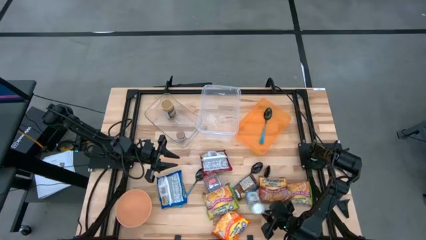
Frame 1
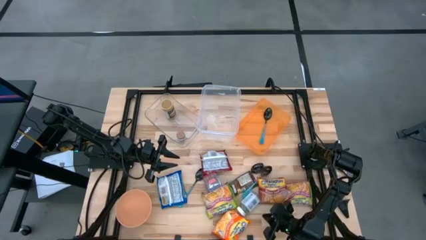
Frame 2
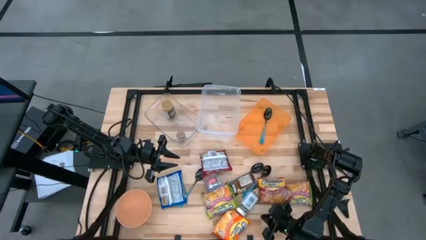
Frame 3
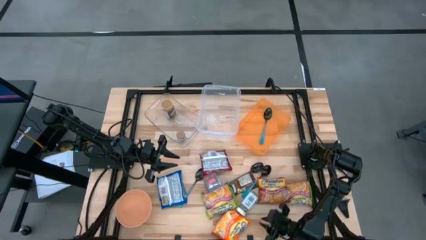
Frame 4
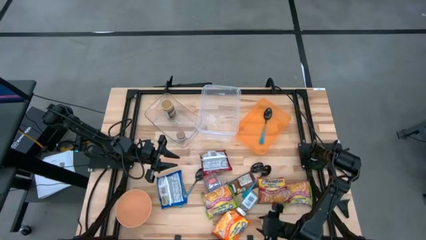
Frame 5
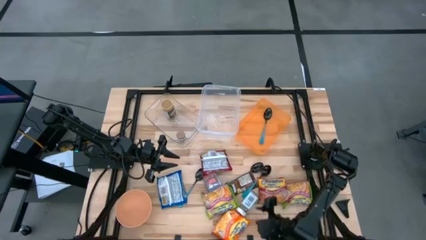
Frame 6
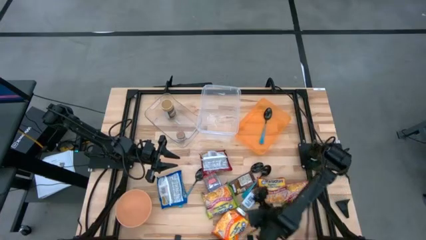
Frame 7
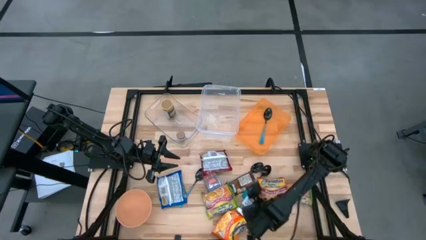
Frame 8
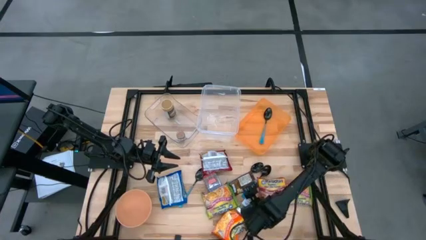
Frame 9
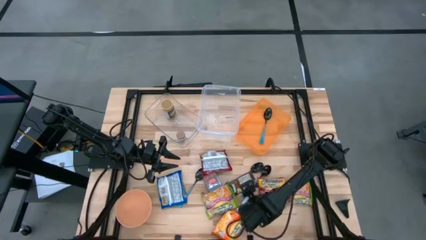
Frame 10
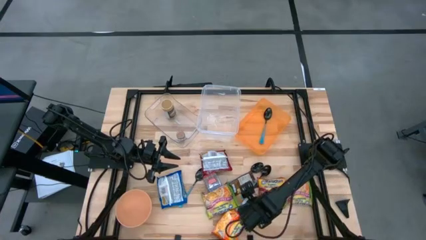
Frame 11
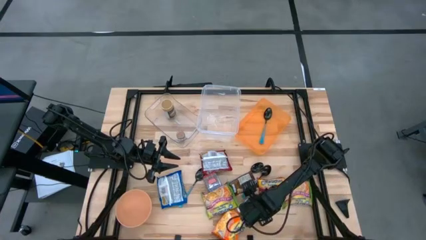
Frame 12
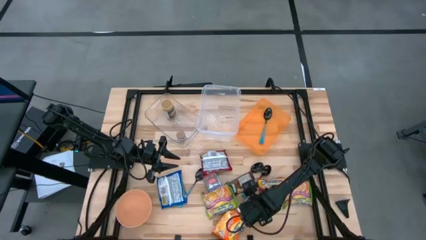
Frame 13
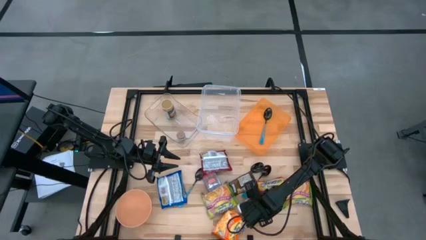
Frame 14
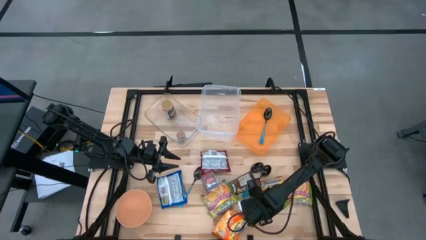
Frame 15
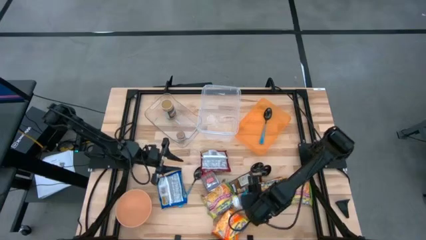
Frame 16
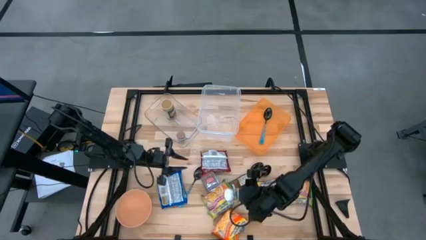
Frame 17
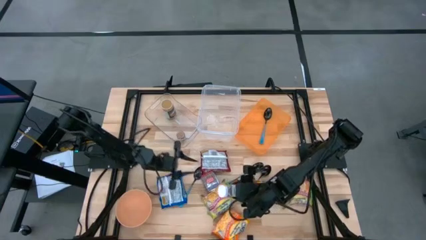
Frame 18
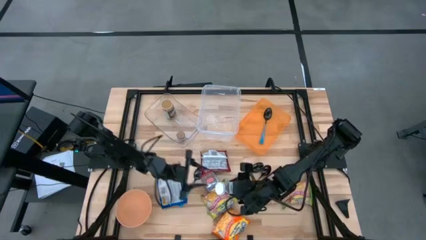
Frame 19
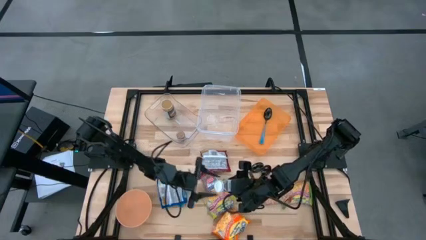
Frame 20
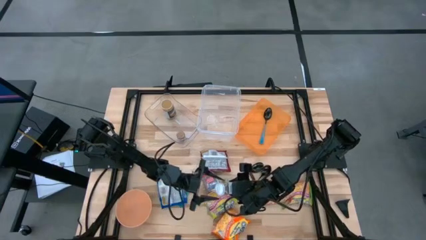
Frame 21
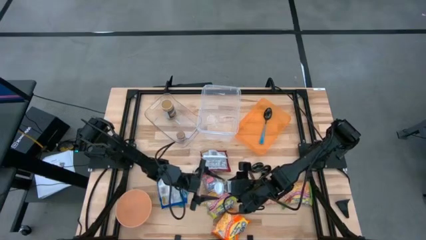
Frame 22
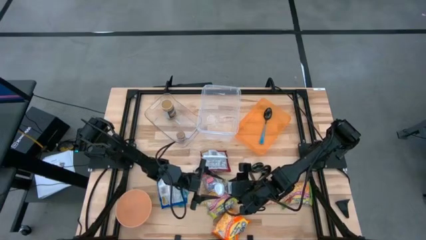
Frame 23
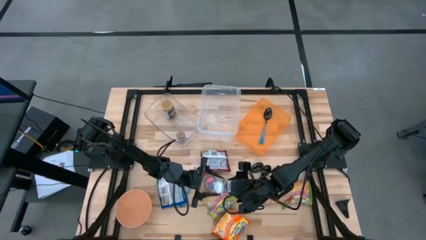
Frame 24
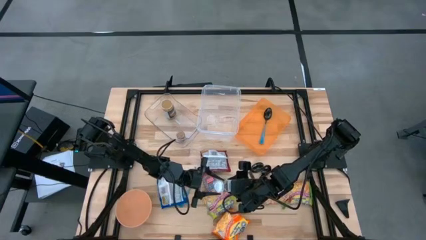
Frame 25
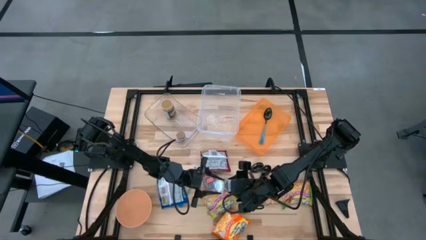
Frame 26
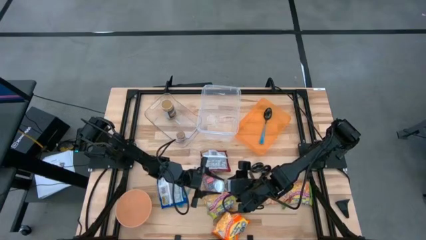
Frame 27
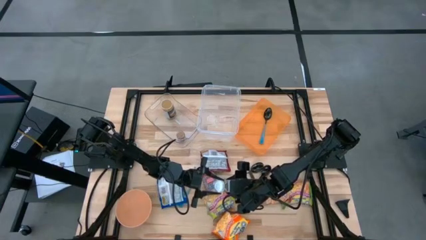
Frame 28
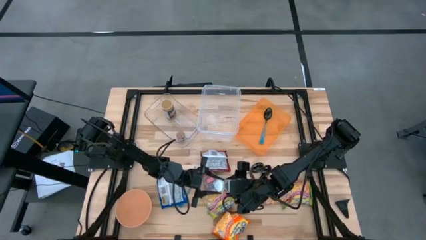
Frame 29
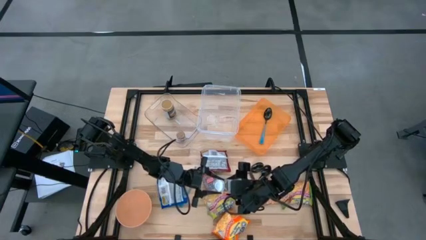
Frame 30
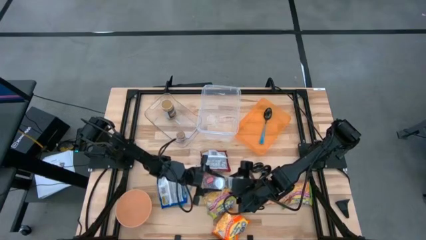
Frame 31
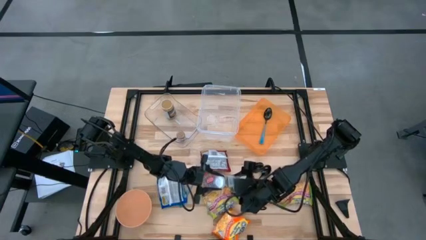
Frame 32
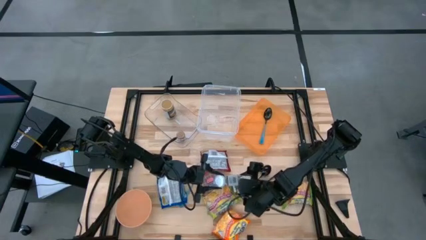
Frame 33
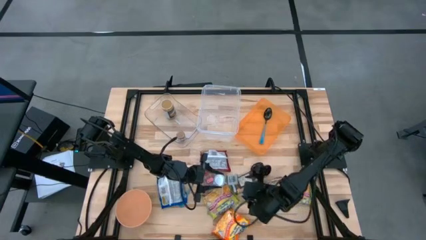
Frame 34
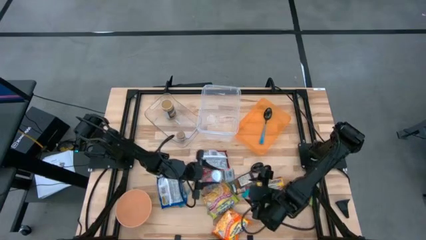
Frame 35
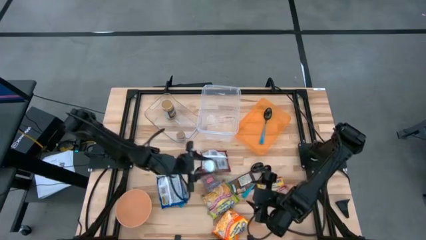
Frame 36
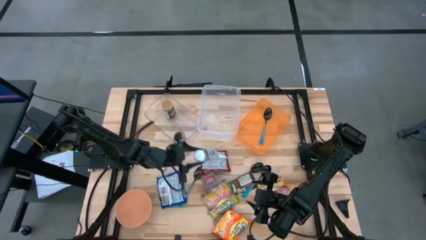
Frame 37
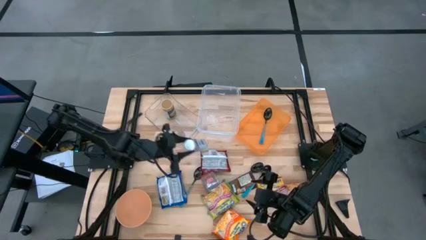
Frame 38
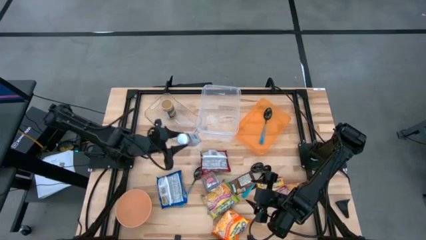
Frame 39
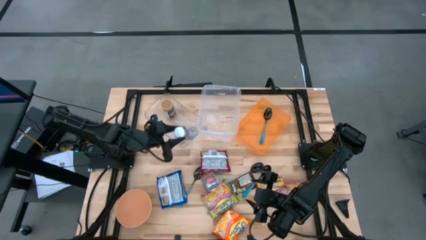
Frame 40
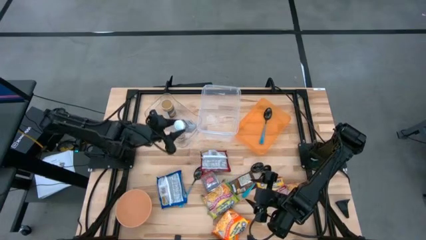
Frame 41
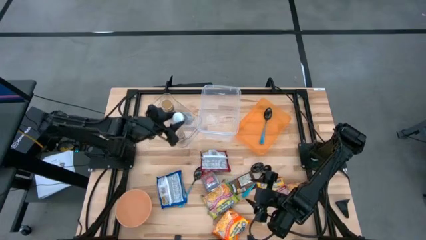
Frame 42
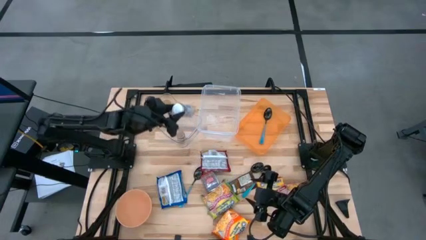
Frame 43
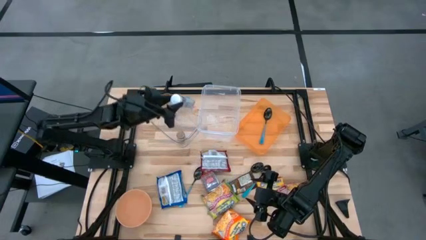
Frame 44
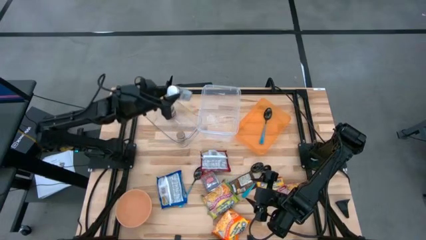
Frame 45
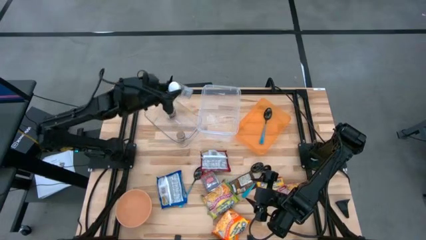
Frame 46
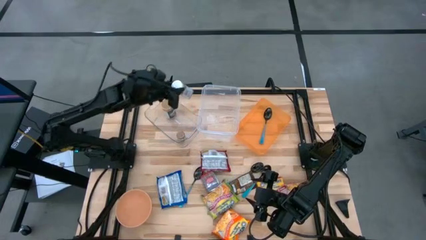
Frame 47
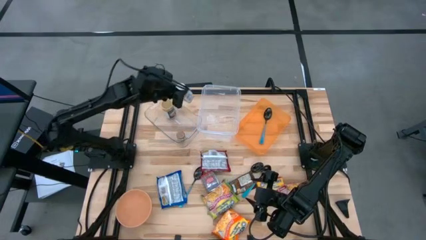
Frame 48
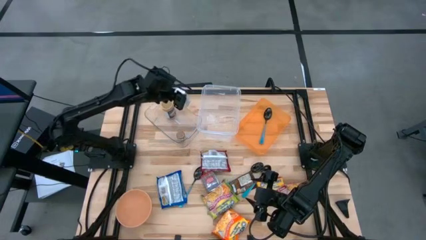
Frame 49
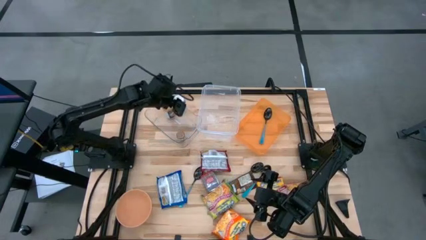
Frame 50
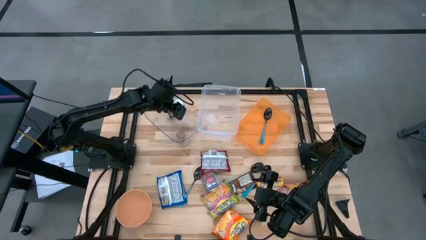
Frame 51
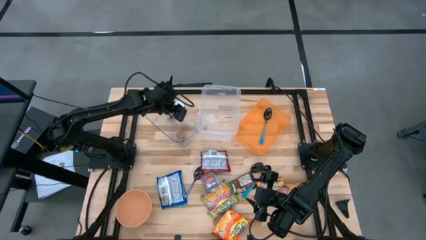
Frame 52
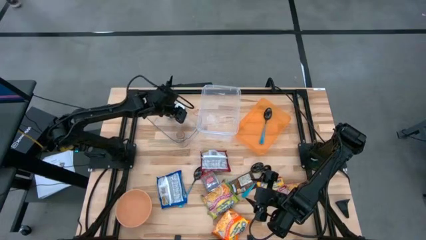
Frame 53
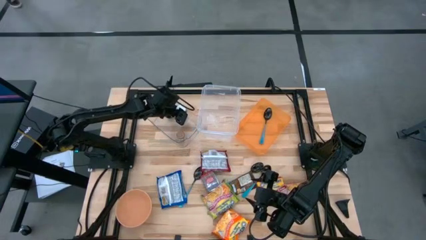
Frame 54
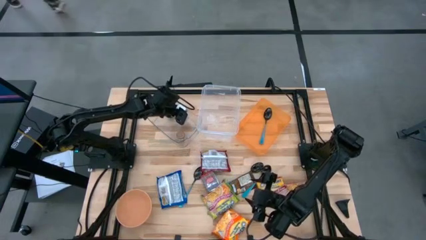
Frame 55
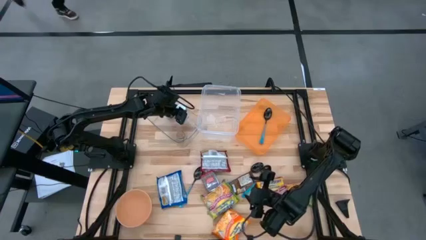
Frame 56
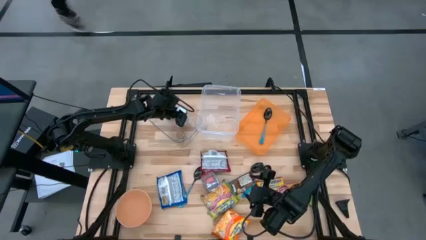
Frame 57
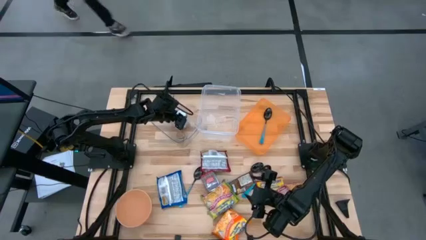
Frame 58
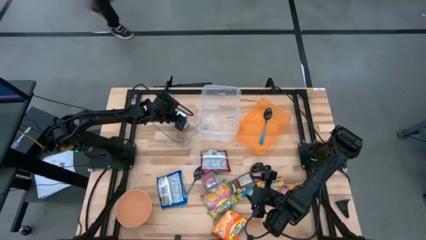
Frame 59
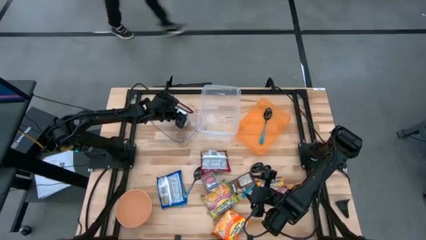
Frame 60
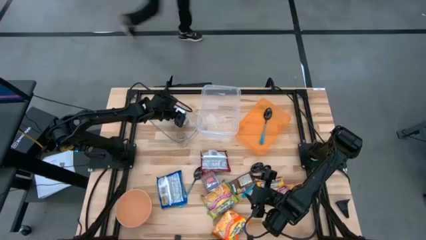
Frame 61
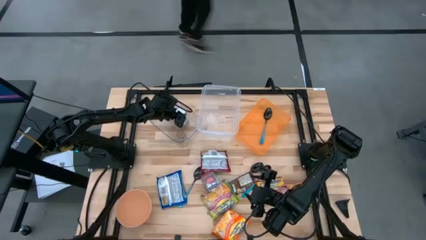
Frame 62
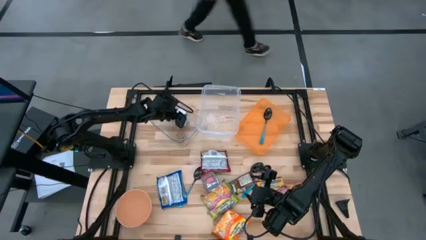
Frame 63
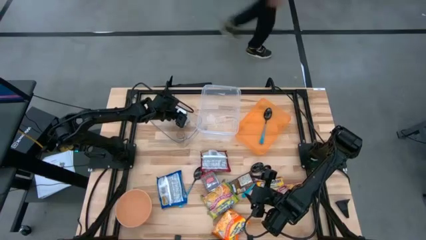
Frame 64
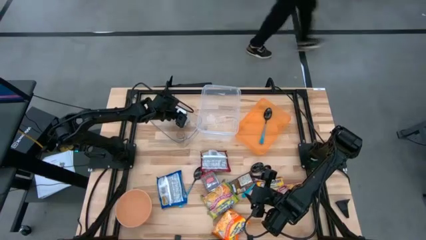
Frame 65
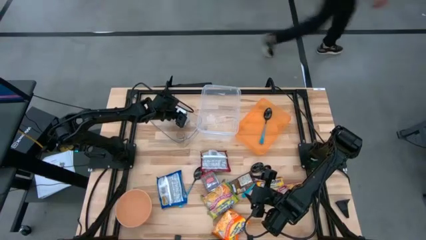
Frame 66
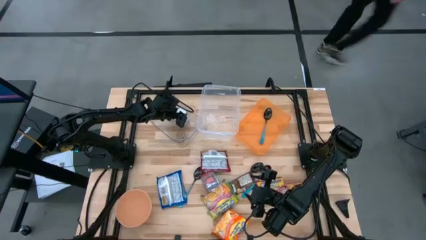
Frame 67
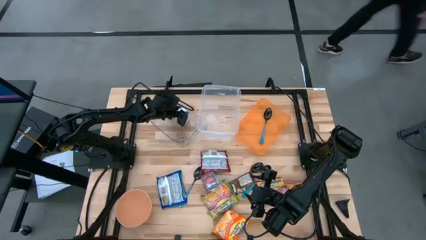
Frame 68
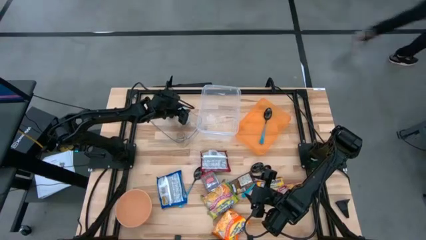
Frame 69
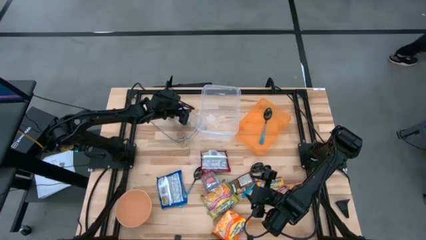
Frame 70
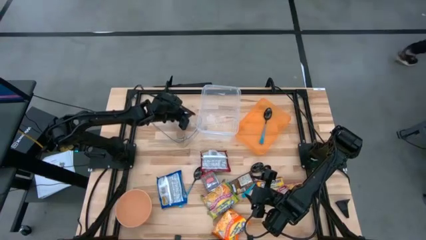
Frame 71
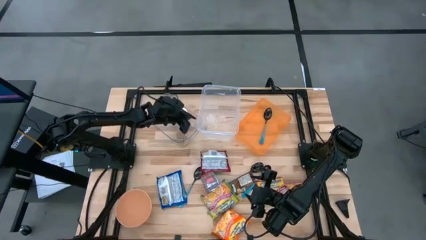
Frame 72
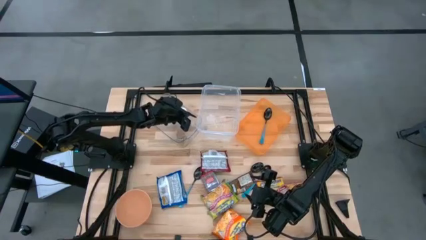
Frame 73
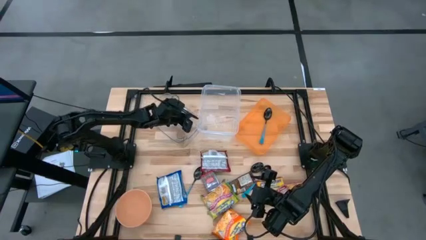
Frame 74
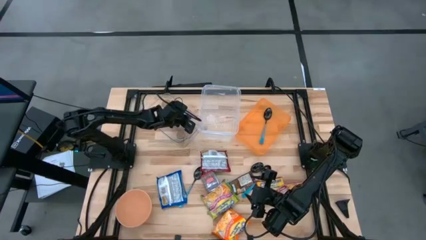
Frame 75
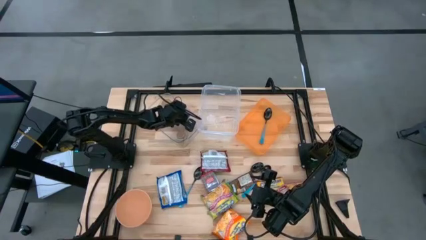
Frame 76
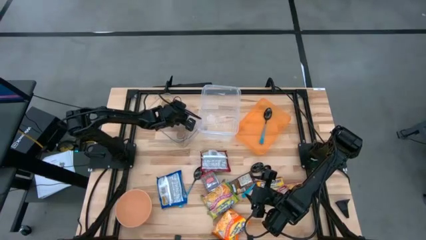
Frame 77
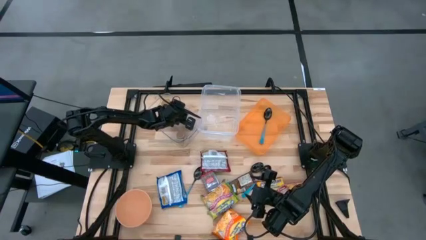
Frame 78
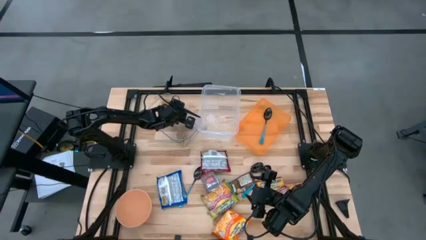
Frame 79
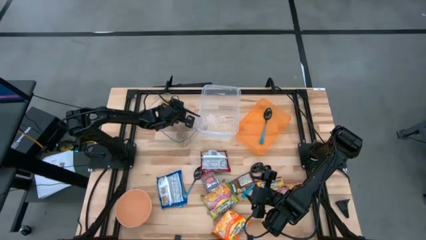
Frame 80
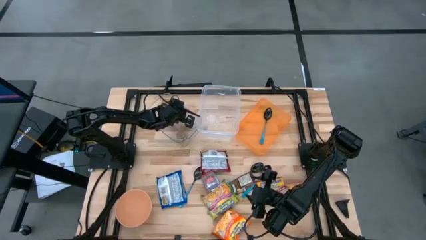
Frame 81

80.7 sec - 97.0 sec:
Task: Pick & Place Food Item
Put the white seasoning bottle into the transparent bin
